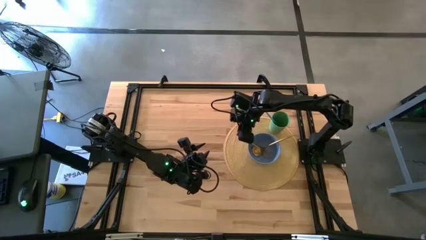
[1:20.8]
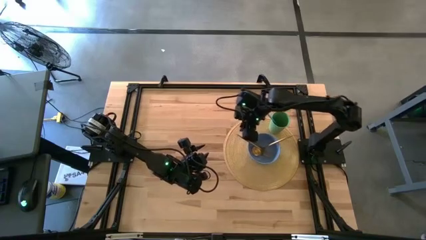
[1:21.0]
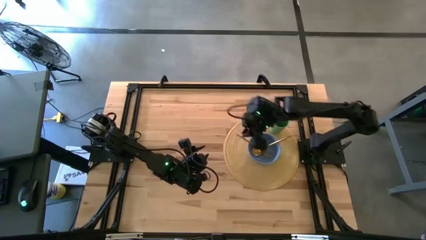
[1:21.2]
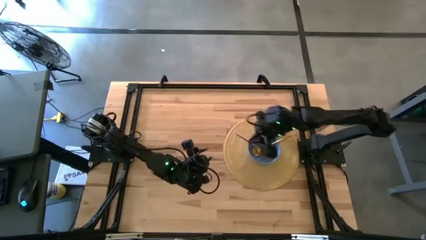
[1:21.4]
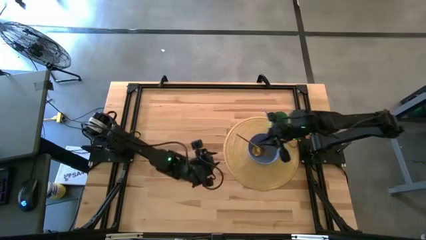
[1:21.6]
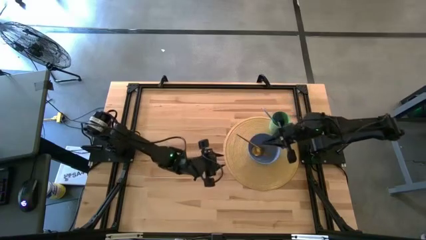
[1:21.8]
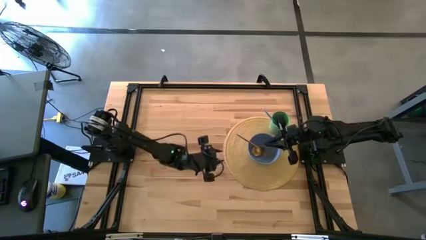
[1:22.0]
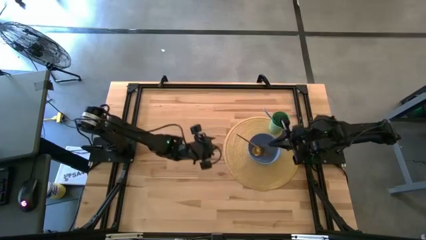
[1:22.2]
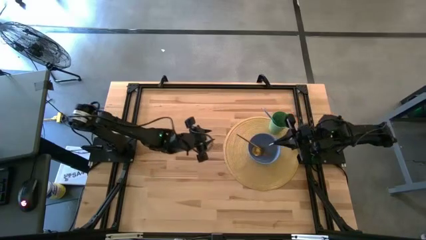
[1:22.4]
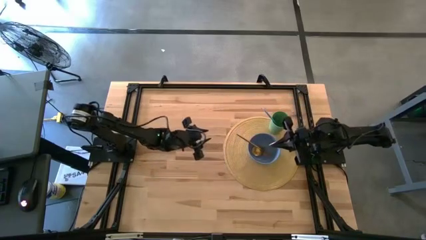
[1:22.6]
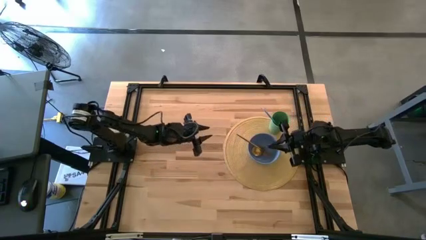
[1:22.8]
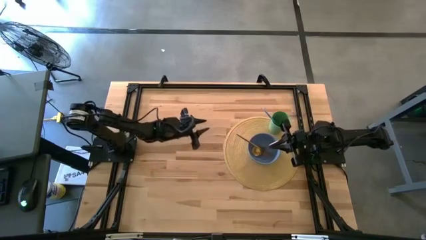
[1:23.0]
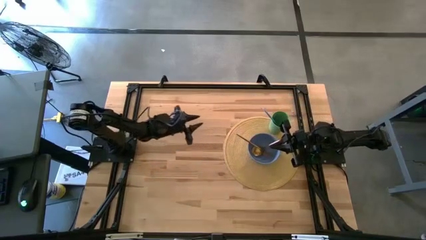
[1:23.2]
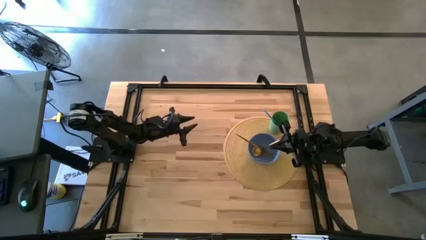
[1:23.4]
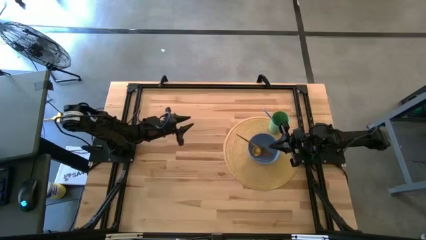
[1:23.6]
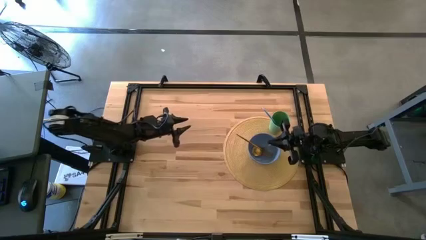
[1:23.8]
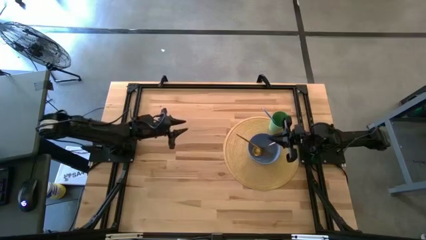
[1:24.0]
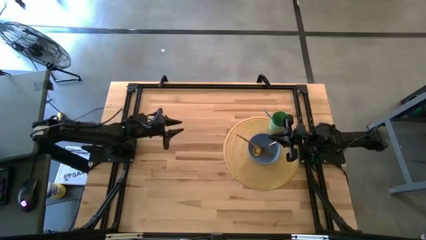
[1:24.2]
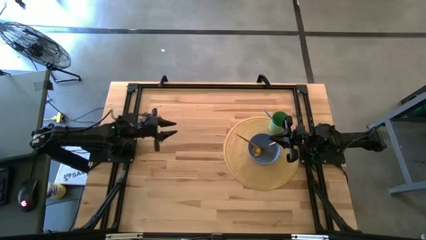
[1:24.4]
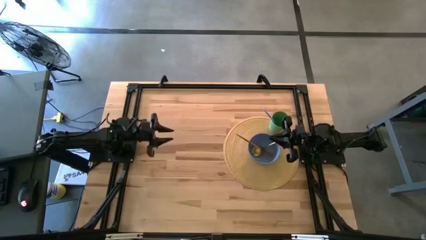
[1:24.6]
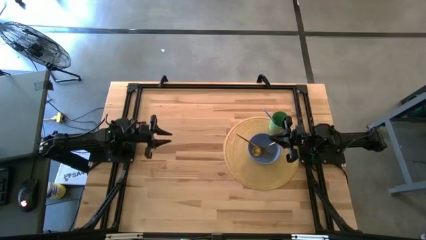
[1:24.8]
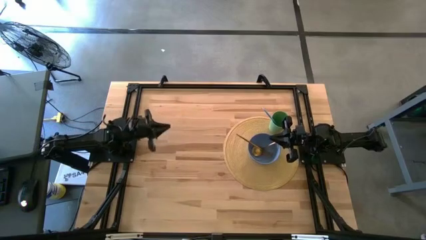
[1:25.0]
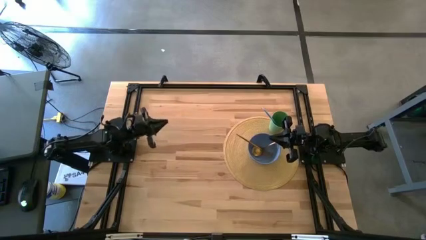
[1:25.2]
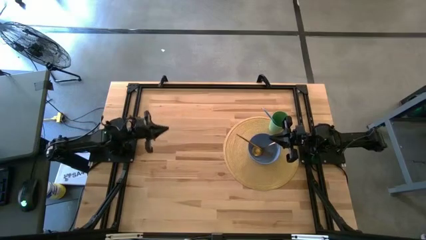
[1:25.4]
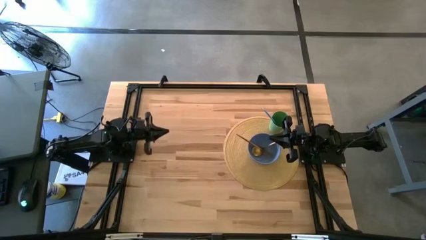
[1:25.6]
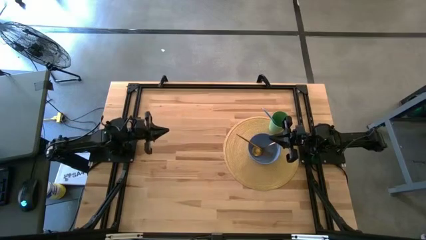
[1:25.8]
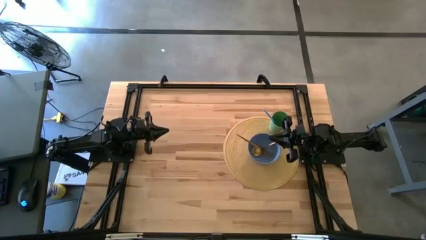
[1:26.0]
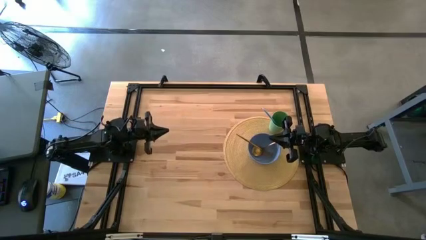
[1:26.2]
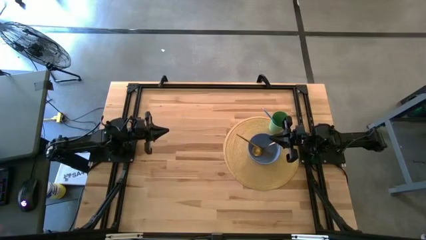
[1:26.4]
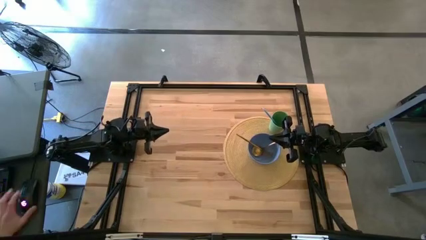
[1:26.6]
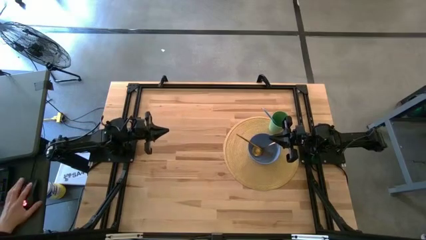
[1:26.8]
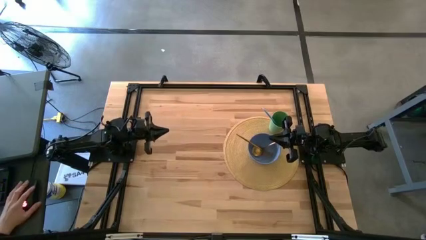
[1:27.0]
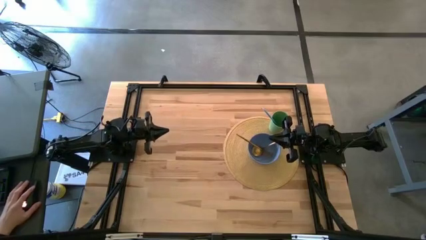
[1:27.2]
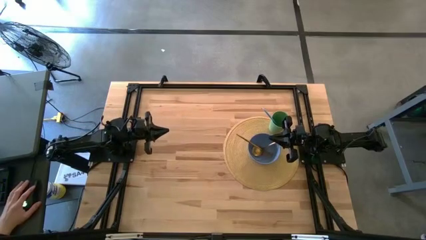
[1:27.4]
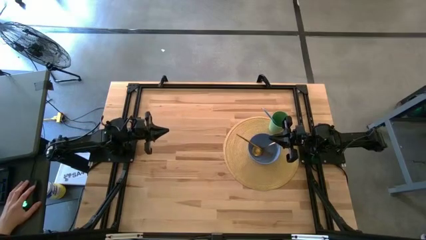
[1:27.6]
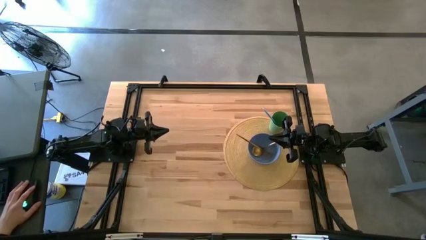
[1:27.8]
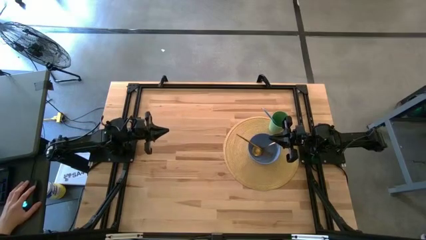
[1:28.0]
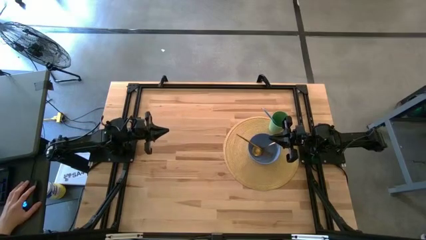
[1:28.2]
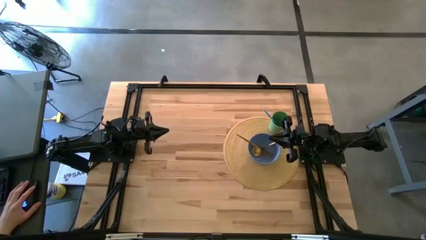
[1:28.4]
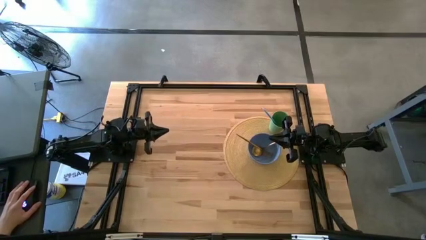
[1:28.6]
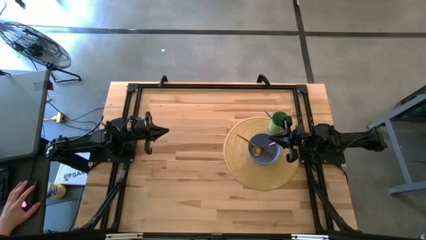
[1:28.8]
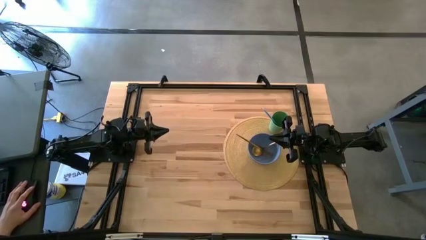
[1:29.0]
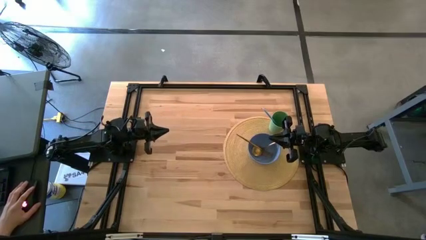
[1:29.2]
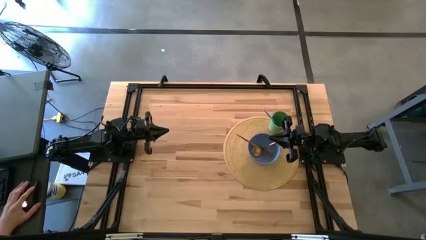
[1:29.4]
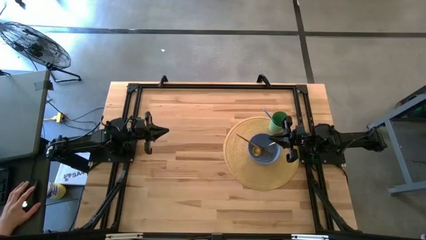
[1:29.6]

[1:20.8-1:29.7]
Task: Pick & Place Utensil
Return to Home Position

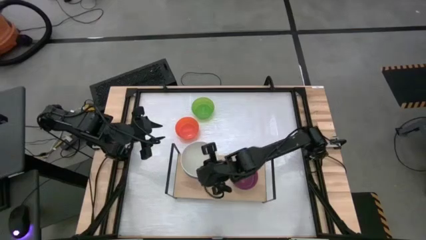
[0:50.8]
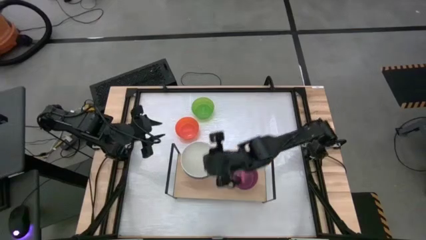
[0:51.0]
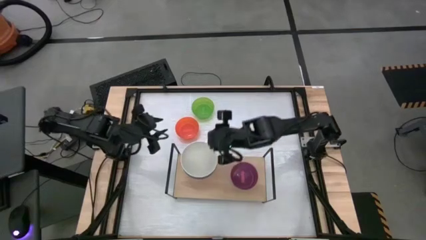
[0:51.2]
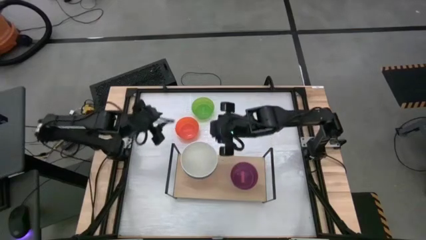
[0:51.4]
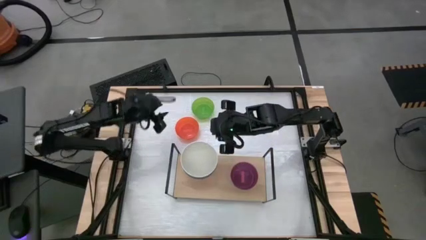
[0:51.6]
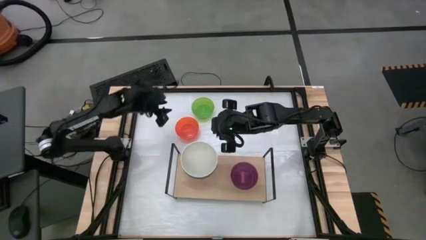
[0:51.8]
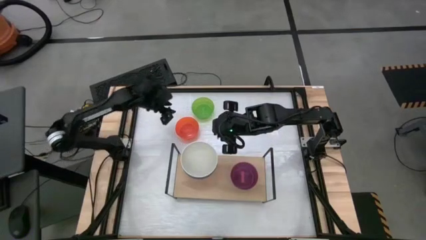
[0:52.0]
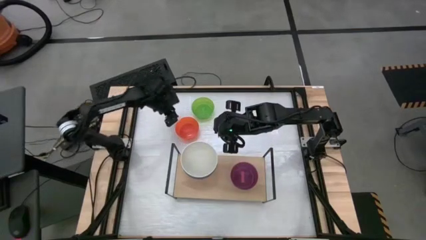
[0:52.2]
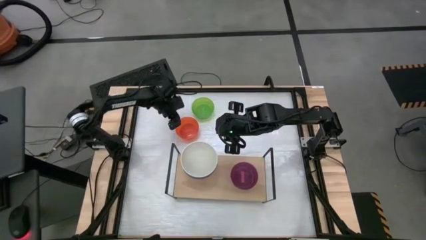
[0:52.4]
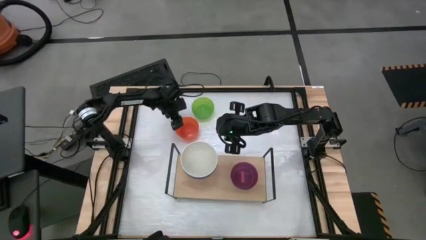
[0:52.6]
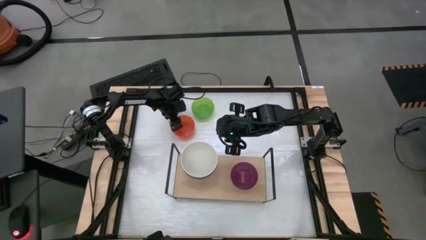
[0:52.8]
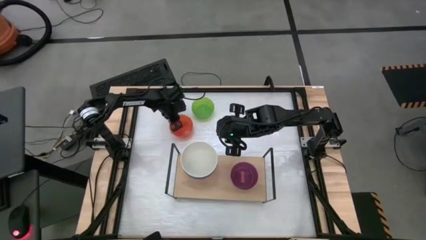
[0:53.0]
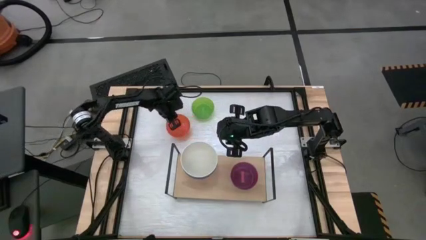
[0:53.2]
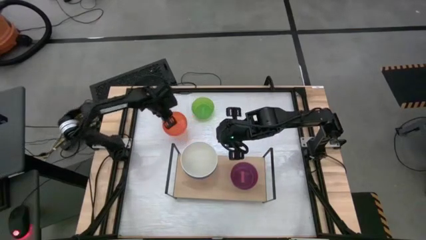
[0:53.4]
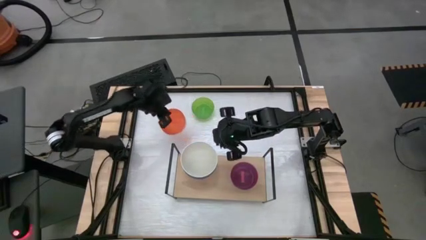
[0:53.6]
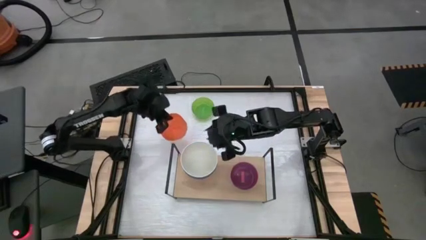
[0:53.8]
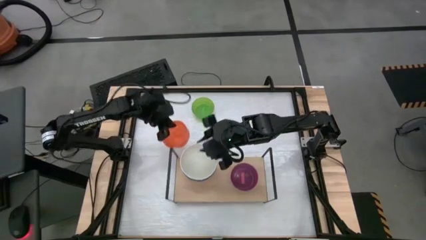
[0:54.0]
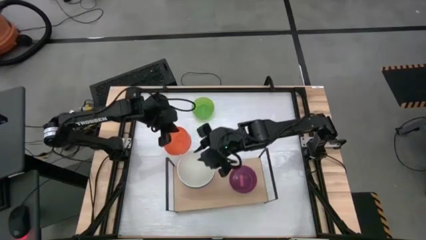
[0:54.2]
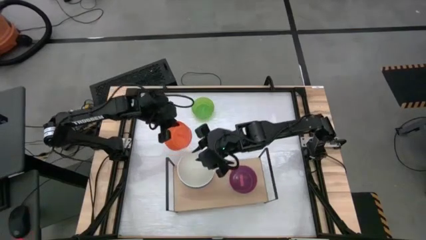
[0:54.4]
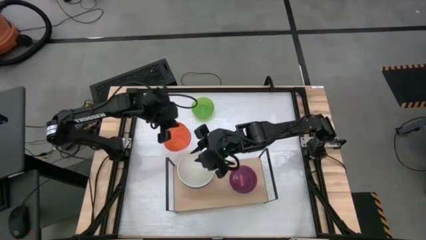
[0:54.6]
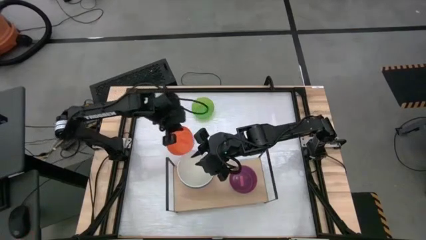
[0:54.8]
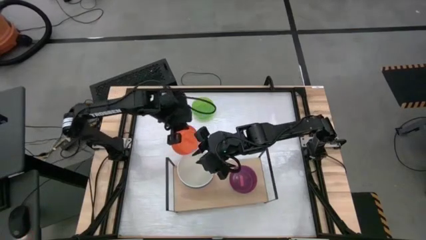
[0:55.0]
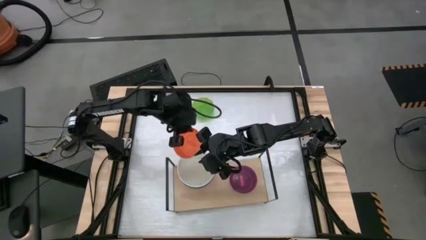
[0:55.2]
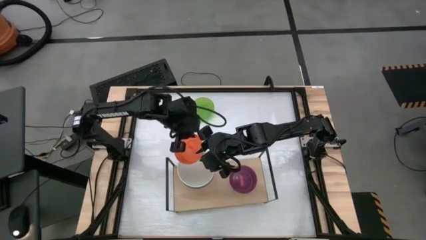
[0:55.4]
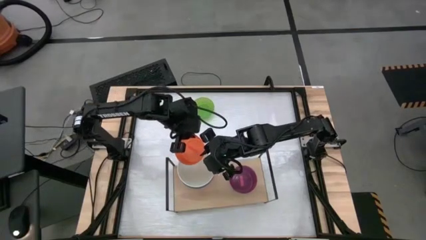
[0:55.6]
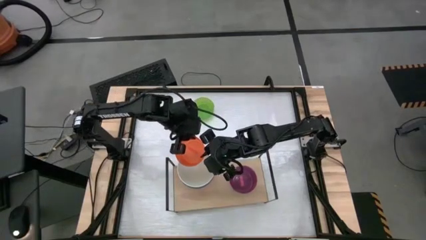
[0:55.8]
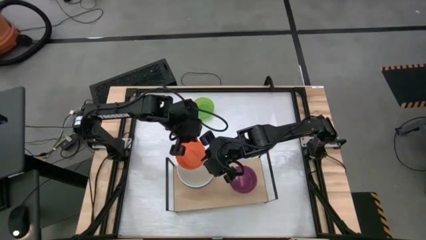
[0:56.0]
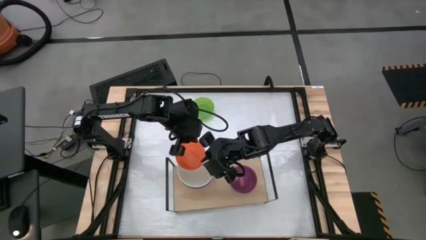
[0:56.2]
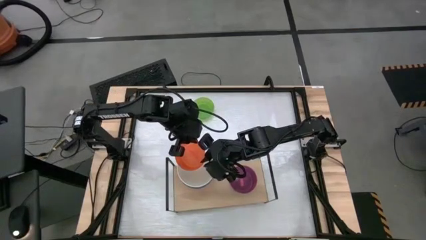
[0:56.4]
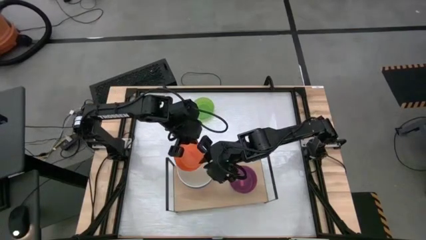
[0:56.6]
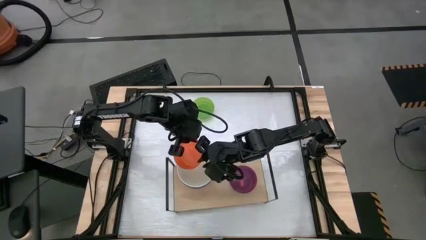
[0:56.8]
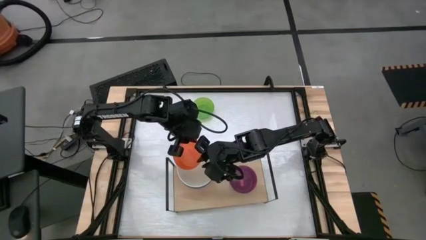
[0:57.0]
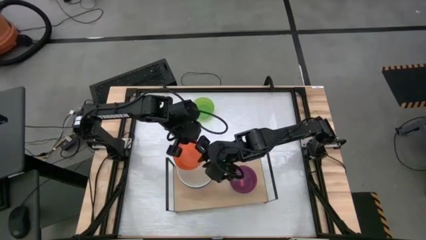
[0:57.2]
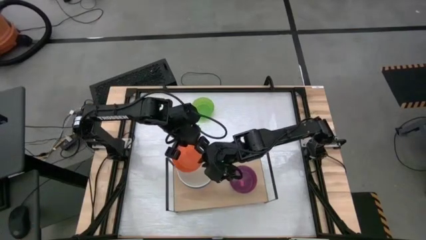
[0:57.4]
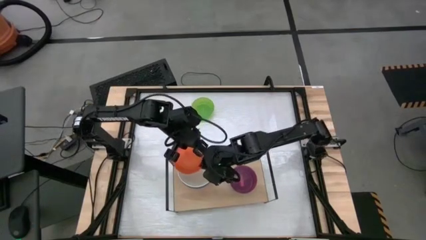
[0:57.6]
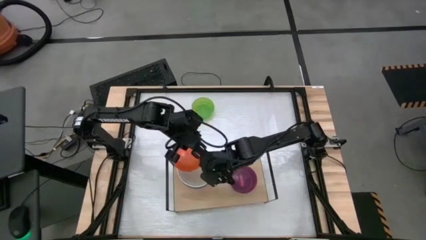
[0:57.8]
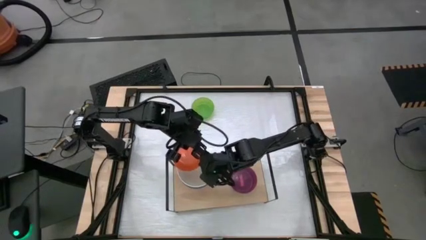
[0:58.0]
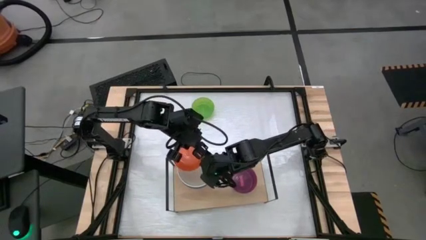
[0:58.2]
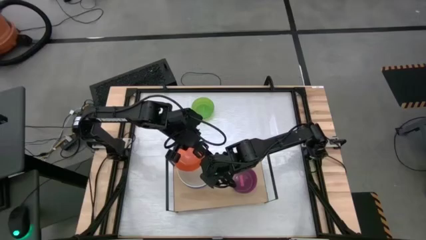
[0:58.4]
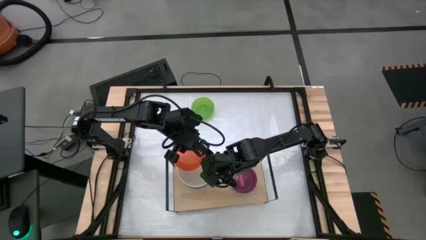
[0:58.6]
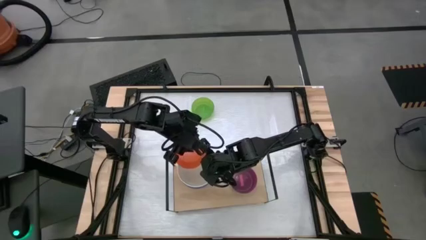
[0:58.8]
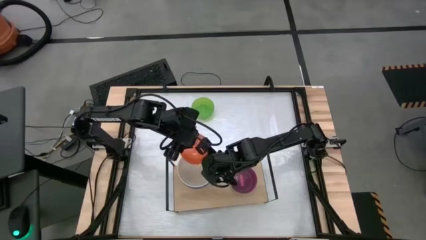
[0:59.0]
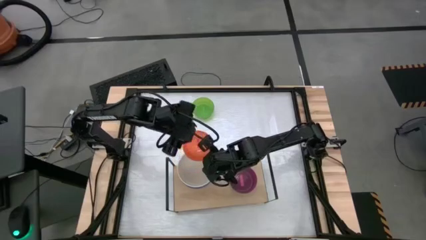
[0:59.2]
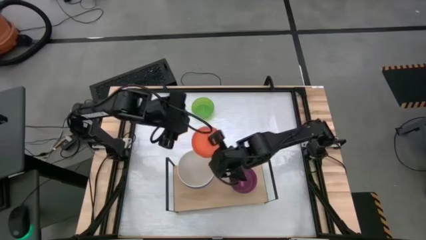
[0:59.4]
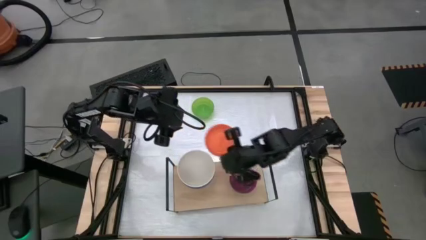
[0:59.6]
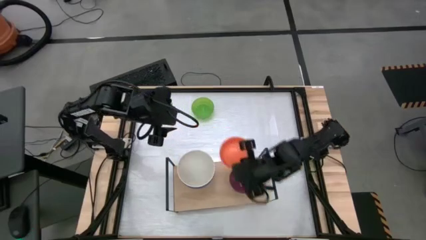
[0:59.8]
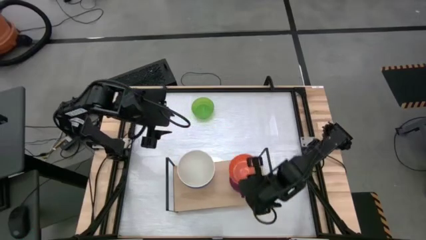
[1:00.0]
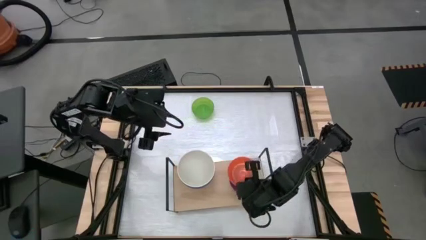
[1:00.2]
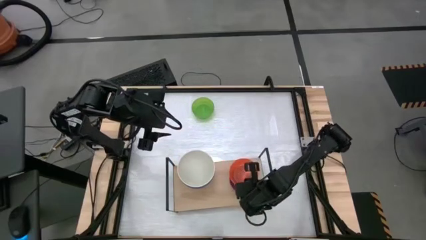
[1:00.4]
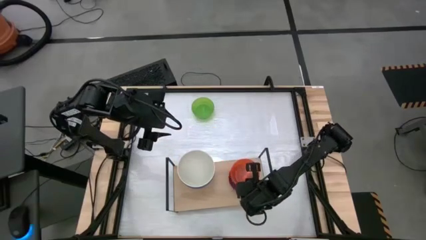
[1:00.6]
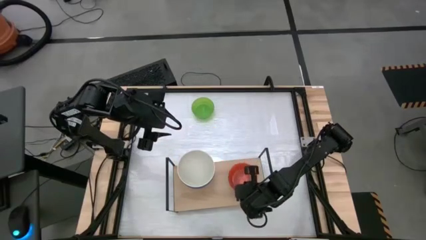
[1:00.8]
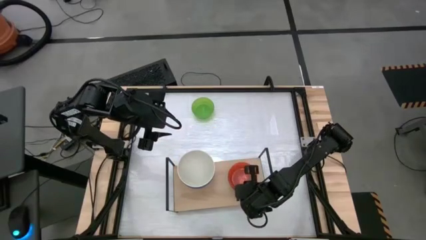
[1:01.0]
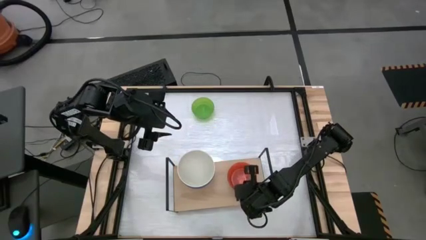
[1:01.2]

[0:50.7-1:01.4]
Task: Place and stack bowls onto a shelf
Stack the small orange bowl on top of the small pink bowl on the shelf
